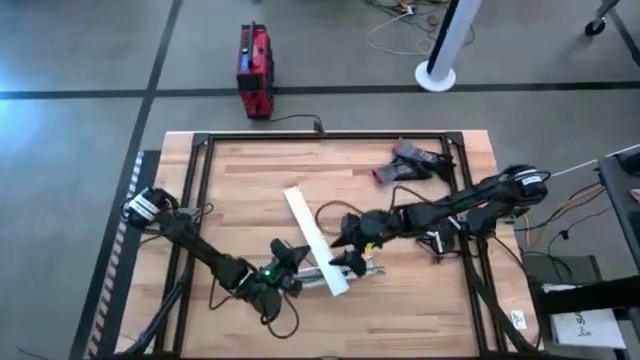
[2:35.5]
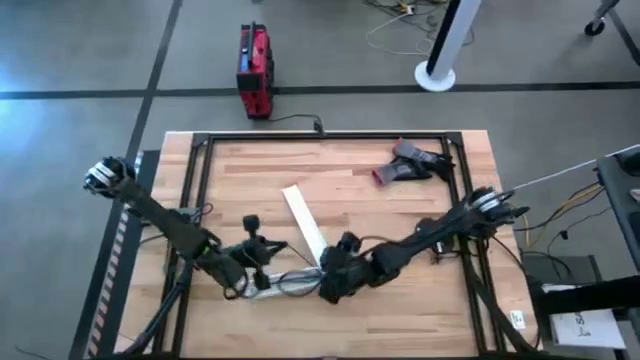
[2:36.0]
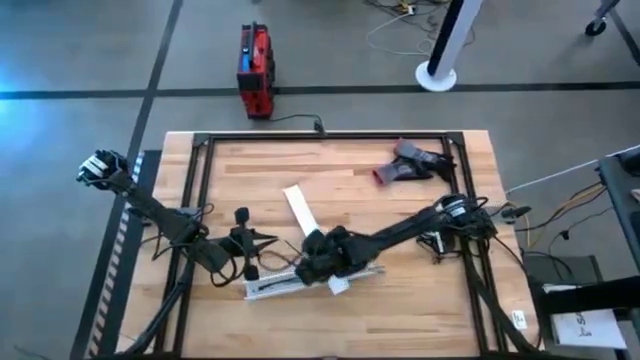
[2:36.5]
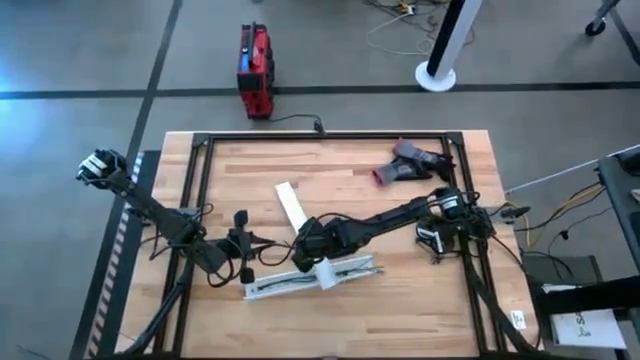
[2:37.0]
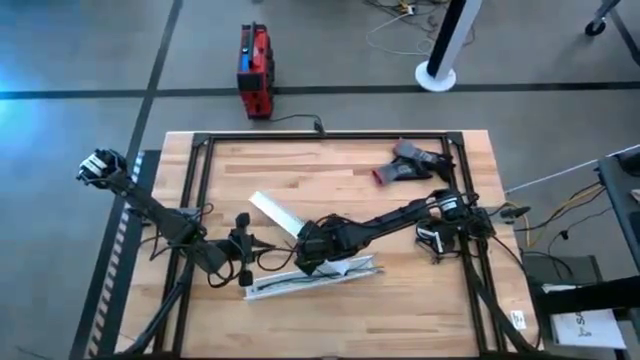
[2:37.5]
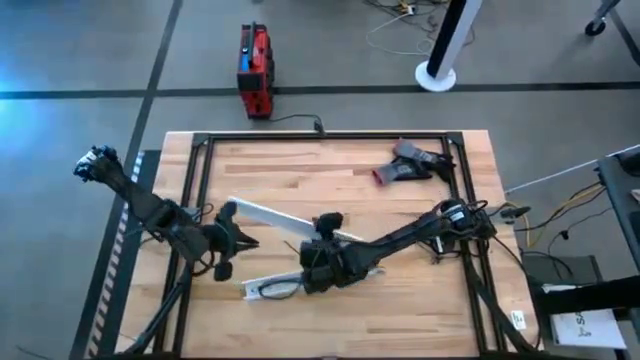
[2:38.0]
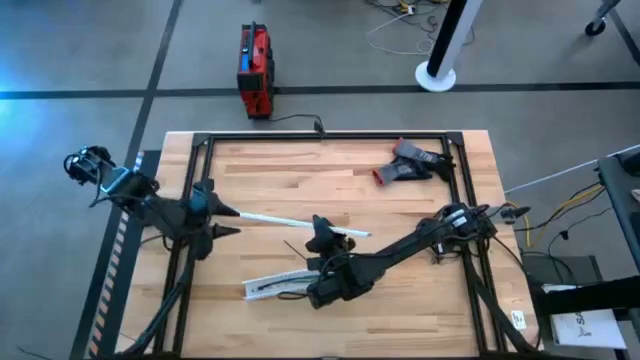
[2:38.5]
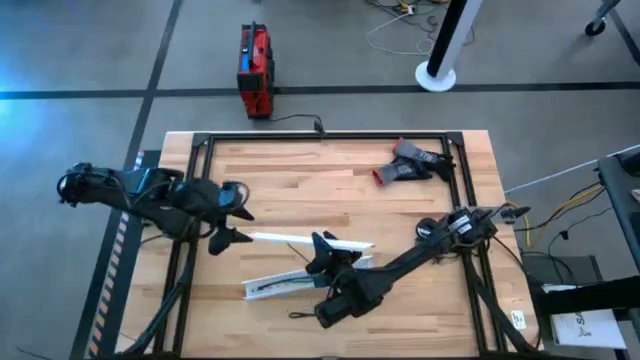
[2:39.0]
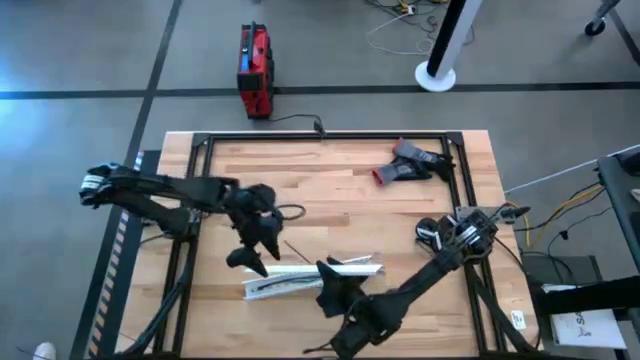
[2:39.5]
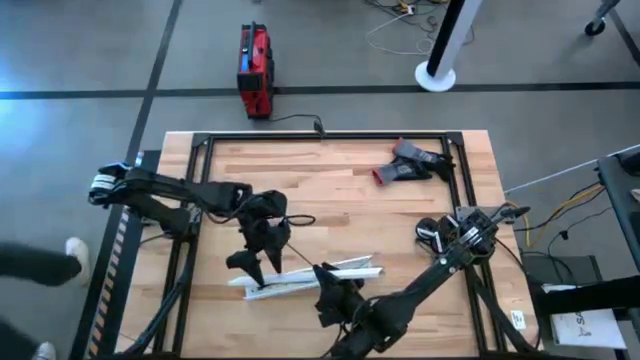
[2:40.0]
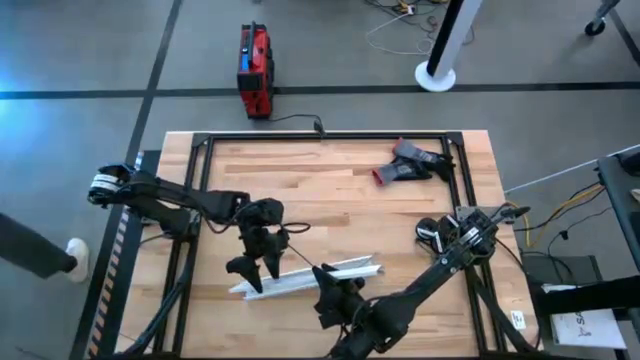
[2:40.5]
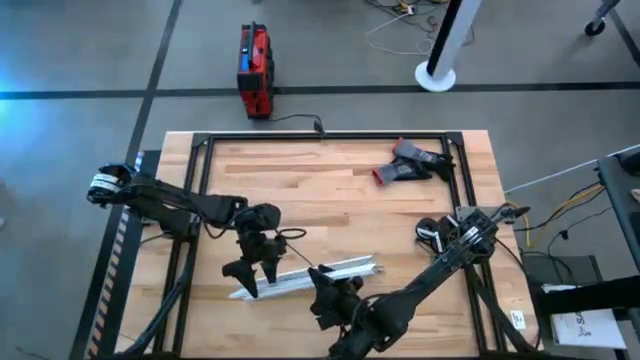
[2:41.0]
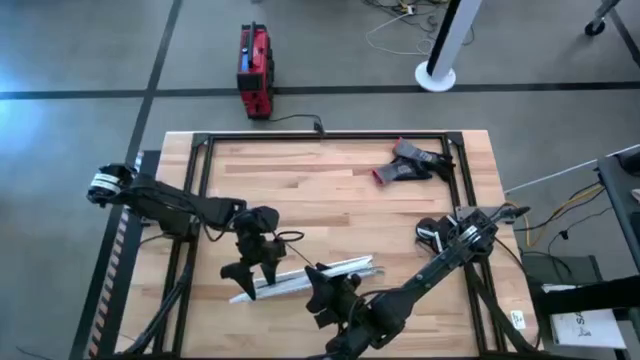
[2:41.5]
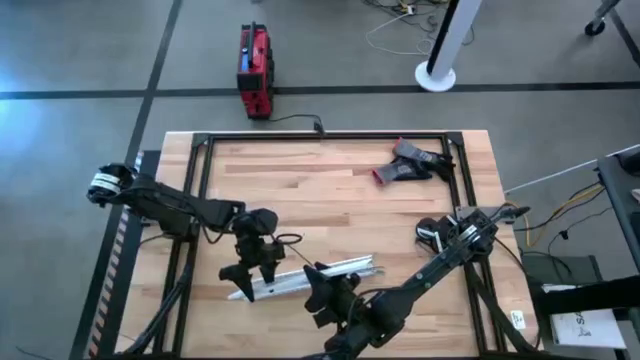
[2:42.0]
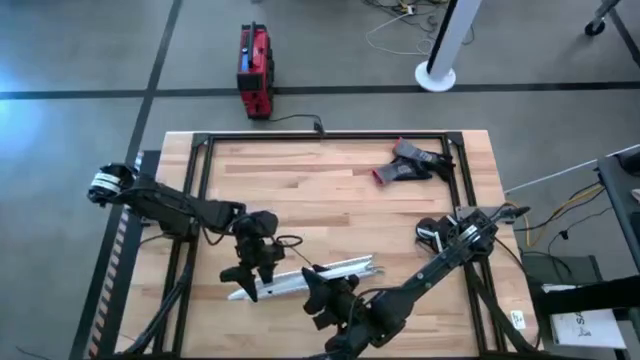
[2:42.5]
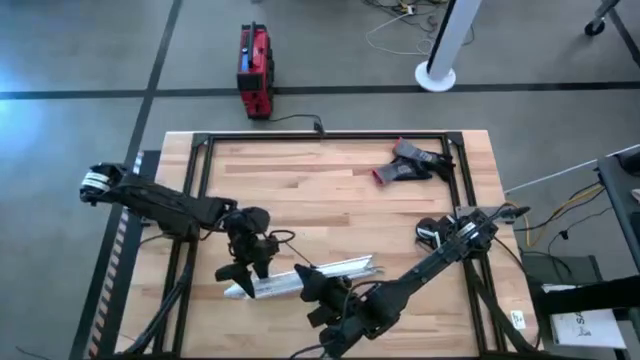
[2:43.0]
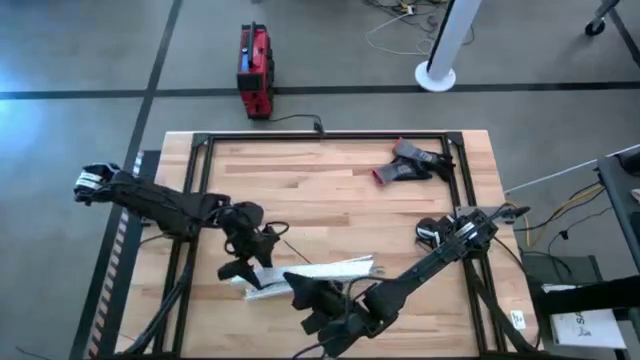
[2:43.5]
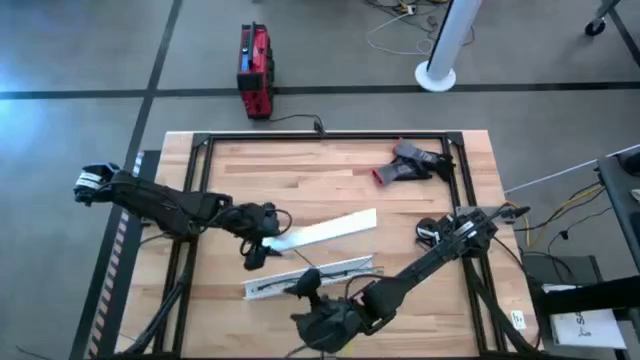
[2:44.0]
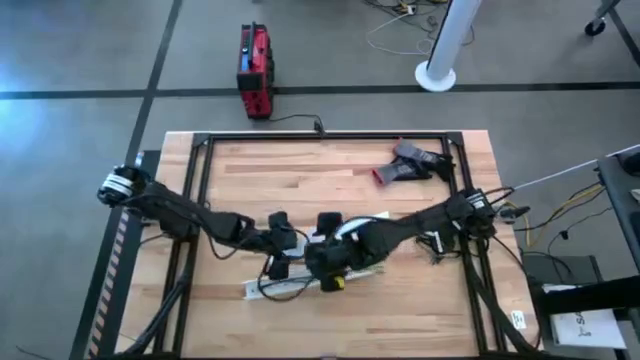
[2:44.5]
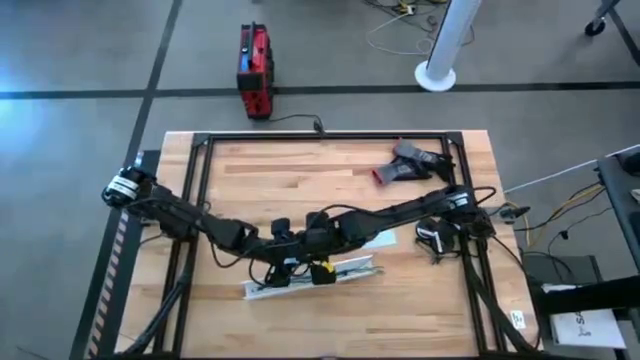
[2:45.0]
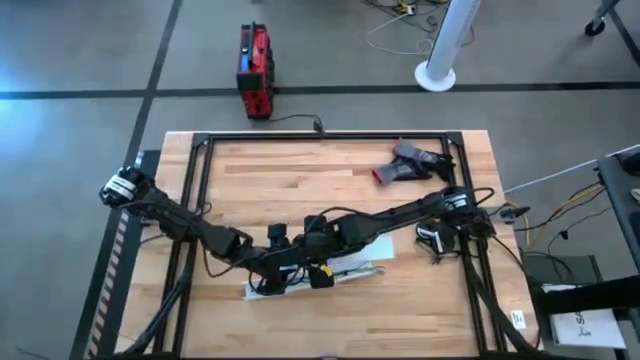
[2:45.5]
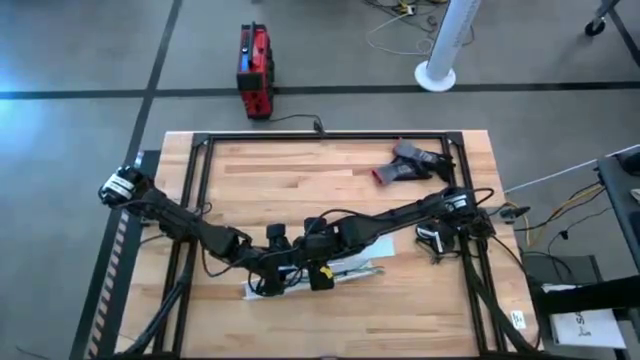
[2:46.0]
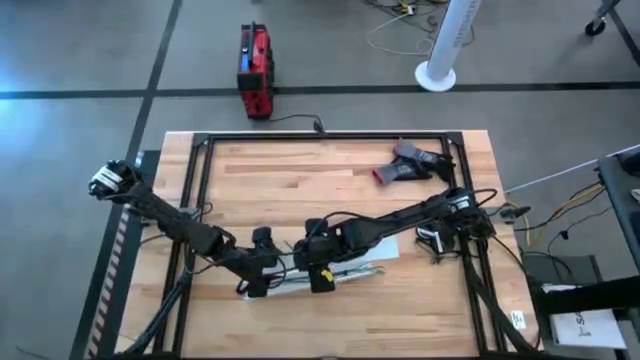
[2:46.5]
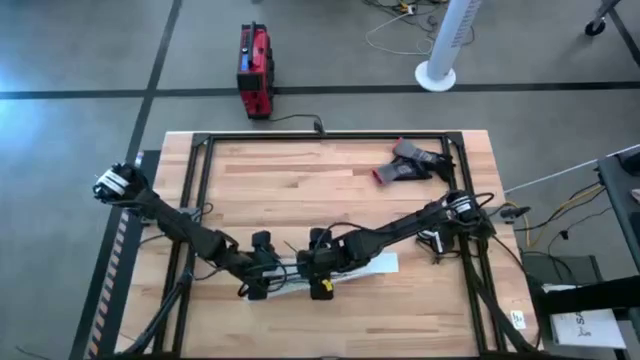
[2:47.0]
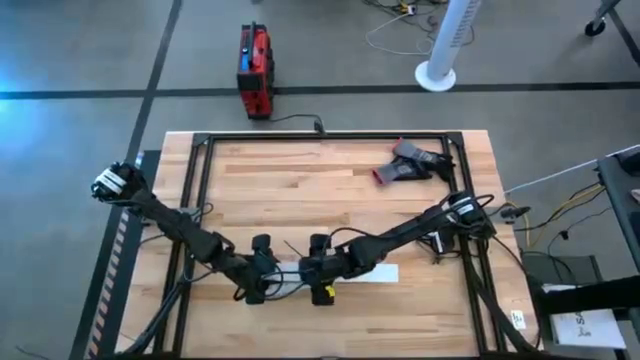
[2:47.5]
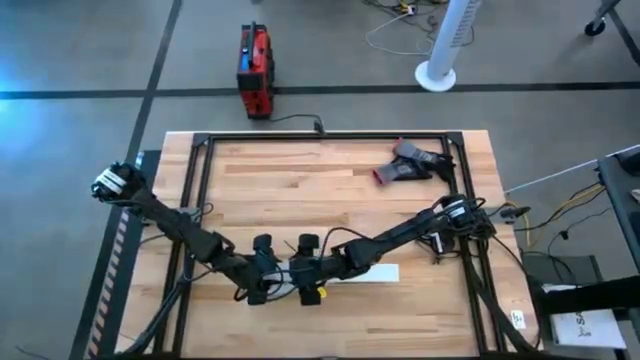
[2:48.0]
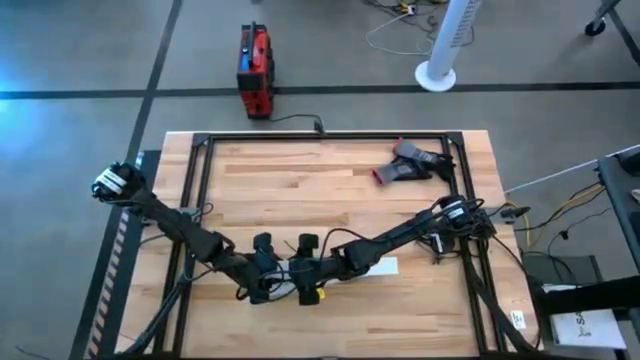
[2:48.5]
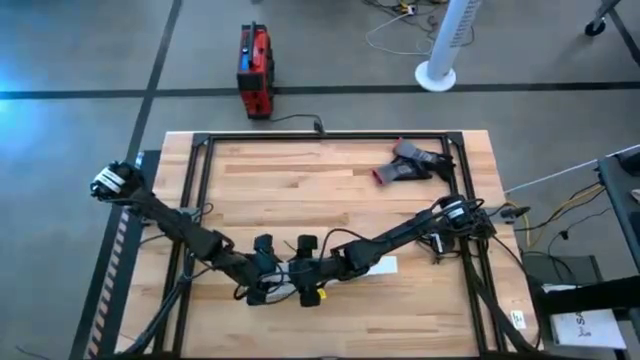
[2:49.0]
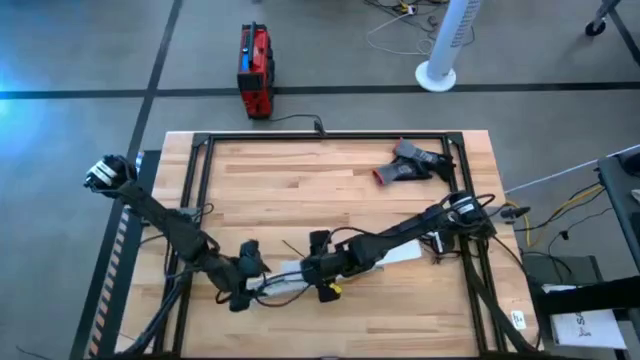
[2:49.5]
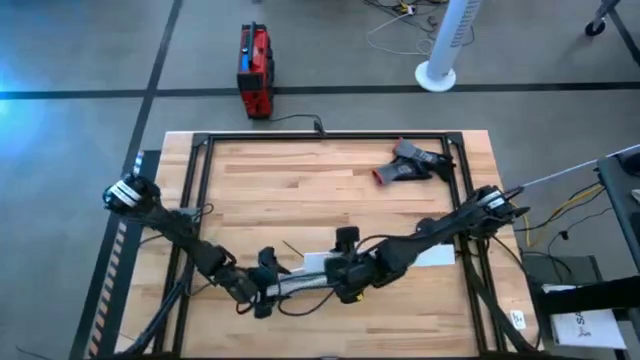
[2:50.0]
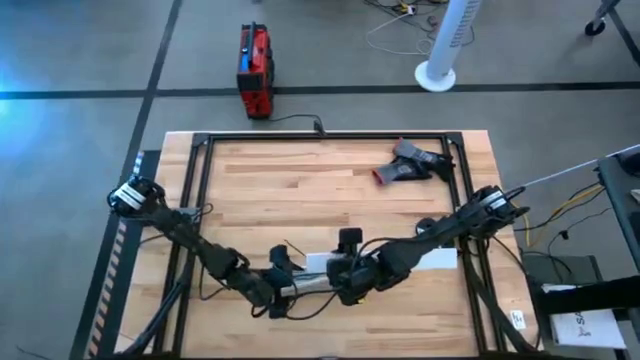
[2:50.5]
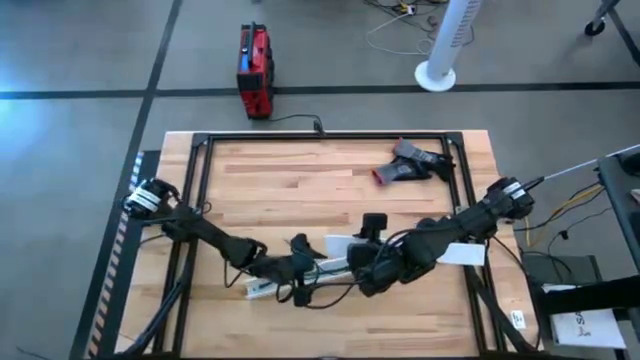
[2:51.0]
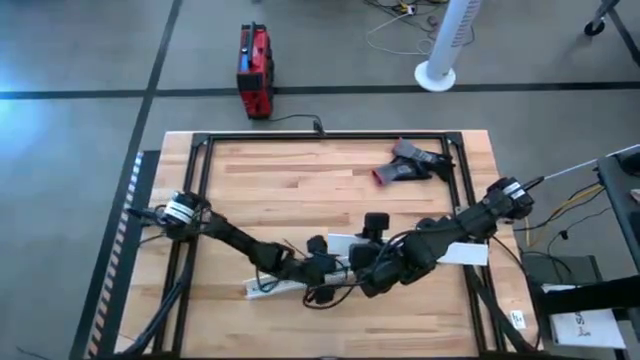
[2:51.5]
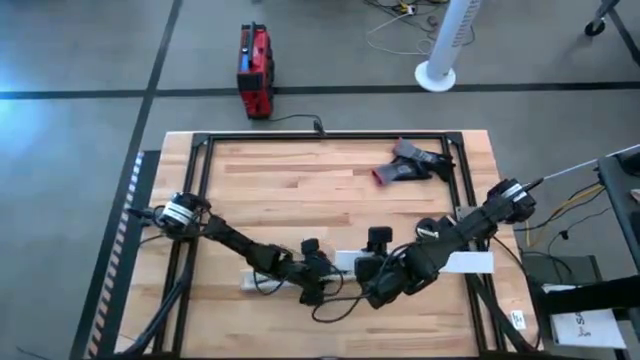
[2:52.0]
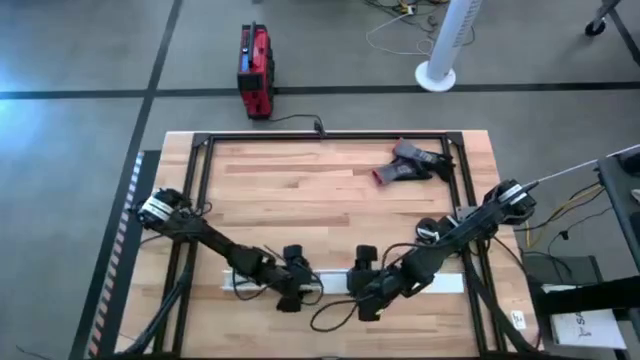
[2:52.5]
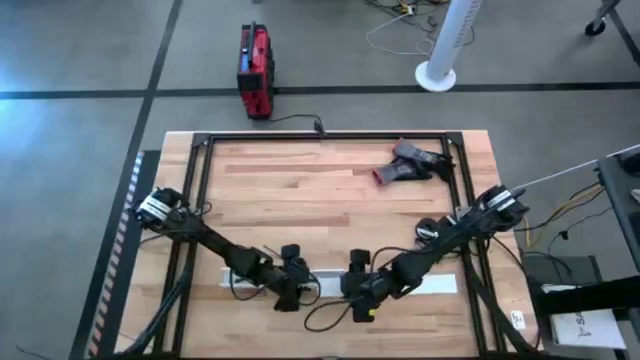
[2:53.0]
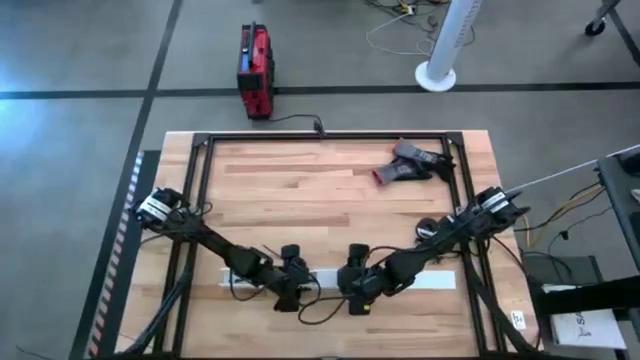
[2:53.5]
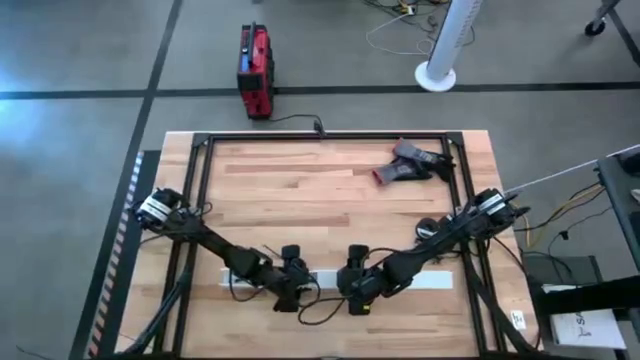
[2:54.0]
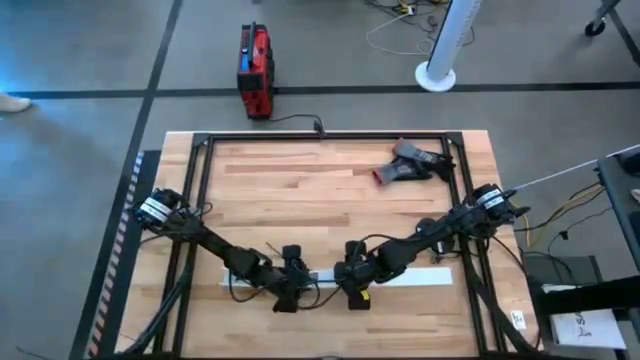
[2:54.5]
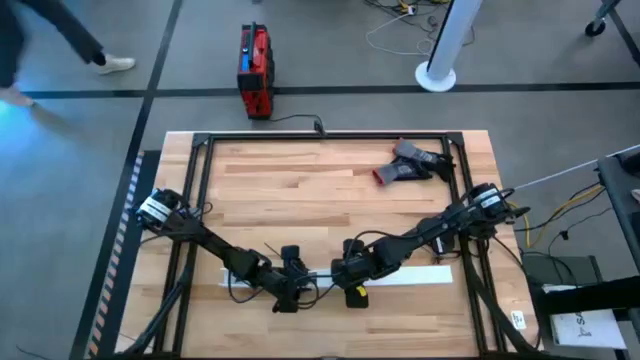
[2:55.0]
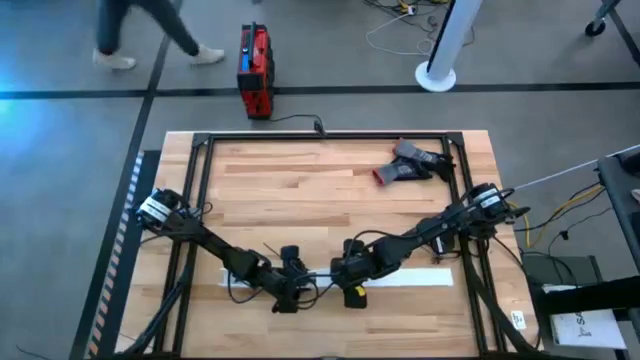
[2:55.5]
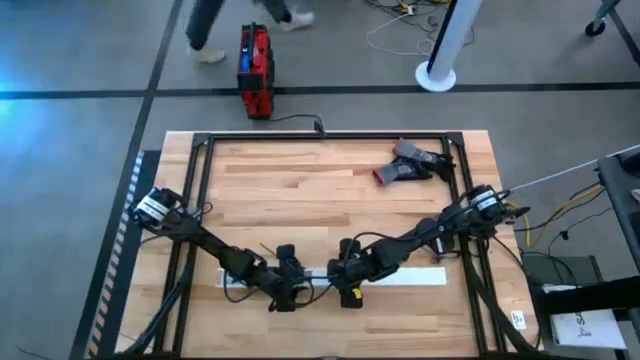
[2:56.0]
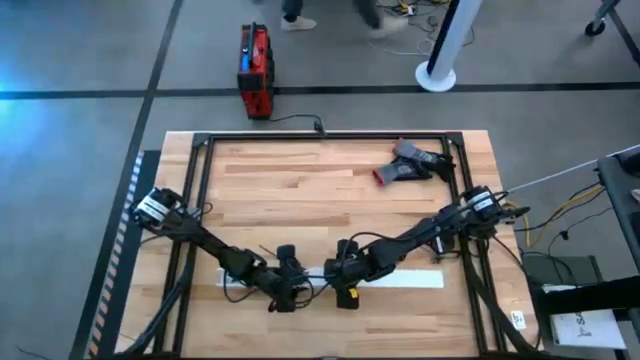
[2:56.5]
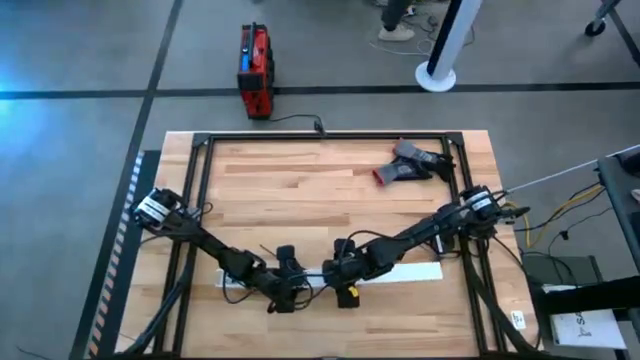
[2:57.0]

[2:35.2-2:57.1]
Task: Ziptie cables
Close the white cable duct
